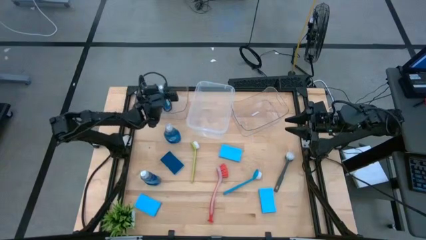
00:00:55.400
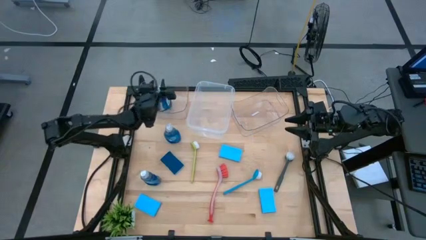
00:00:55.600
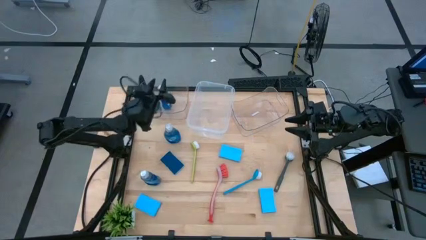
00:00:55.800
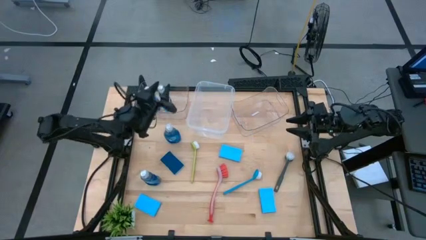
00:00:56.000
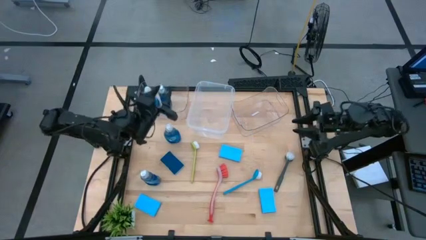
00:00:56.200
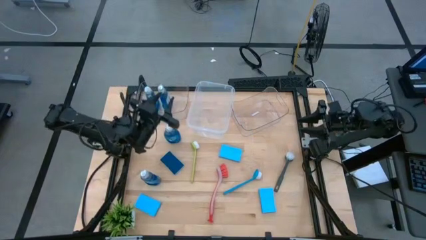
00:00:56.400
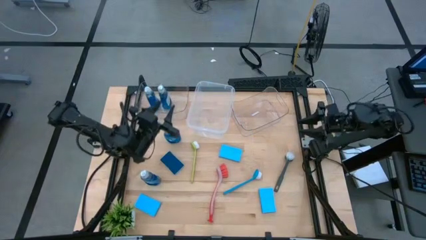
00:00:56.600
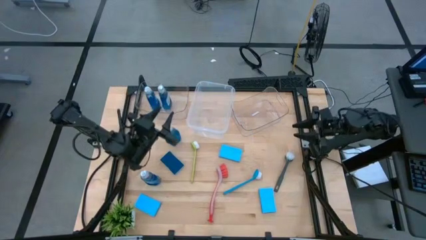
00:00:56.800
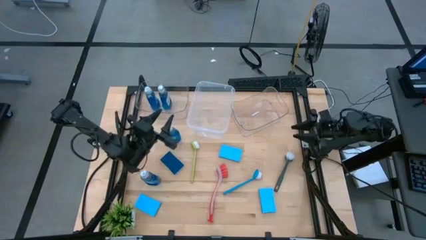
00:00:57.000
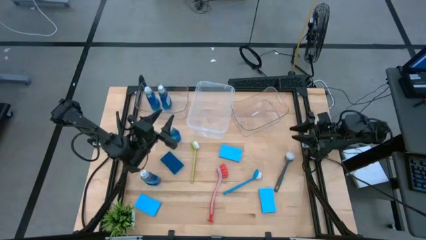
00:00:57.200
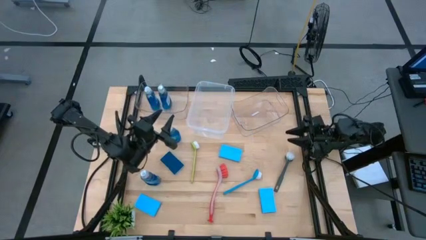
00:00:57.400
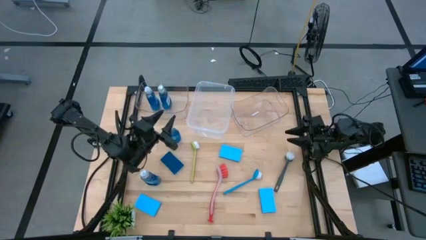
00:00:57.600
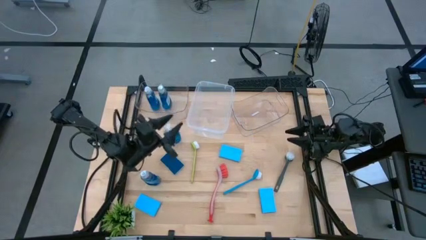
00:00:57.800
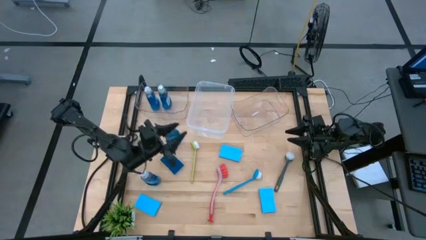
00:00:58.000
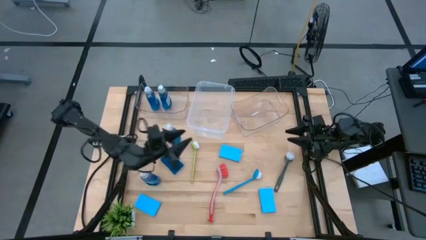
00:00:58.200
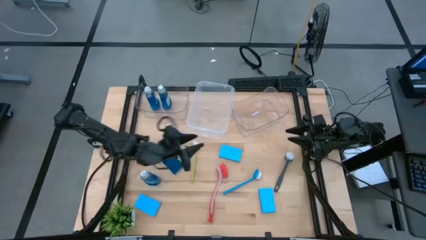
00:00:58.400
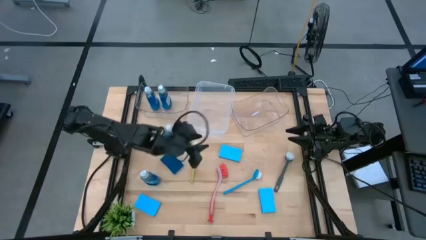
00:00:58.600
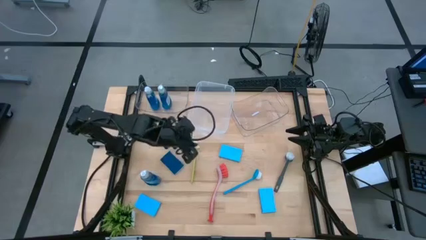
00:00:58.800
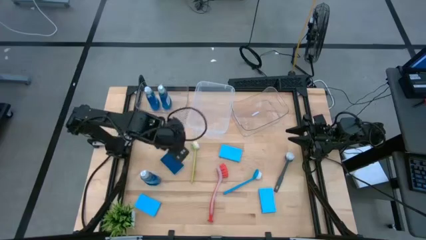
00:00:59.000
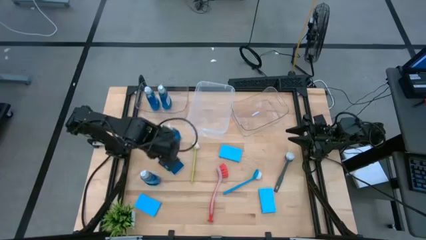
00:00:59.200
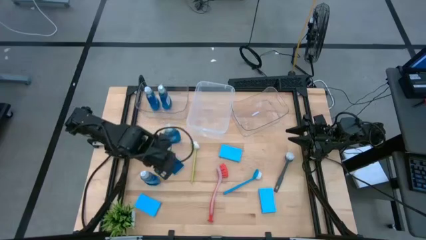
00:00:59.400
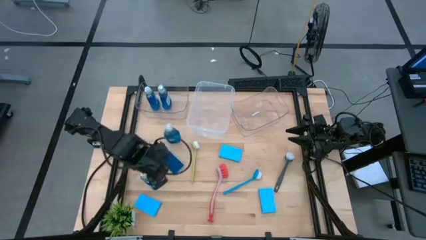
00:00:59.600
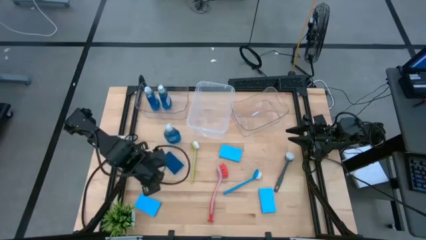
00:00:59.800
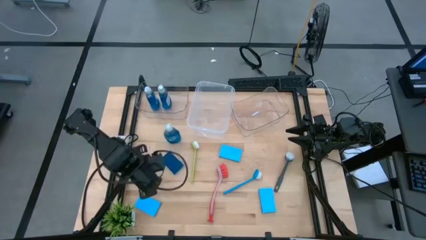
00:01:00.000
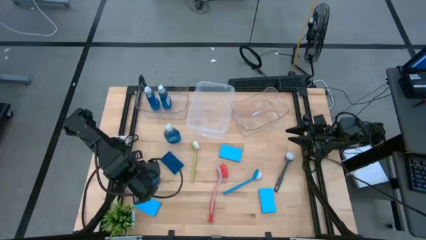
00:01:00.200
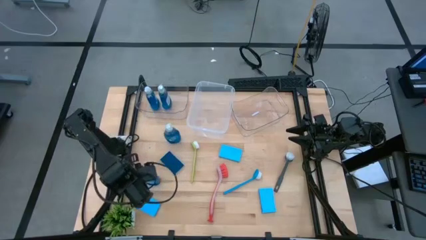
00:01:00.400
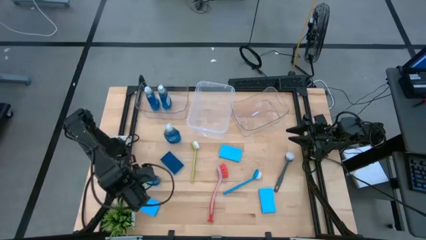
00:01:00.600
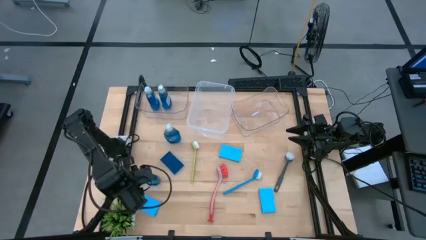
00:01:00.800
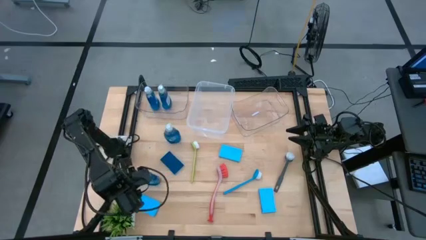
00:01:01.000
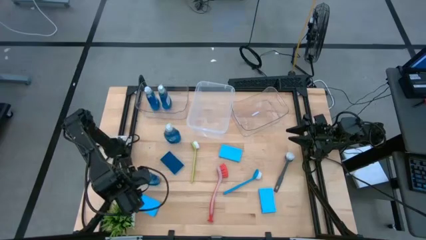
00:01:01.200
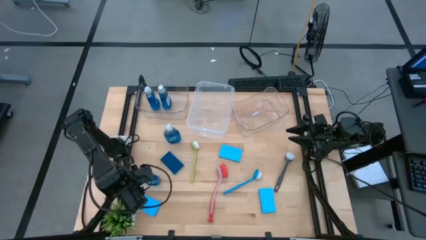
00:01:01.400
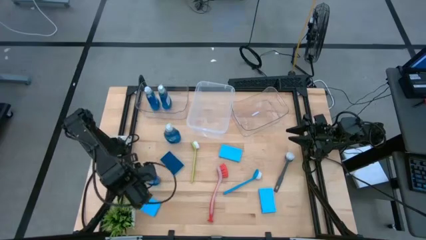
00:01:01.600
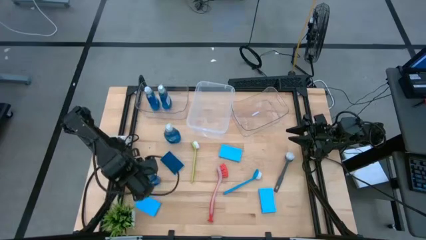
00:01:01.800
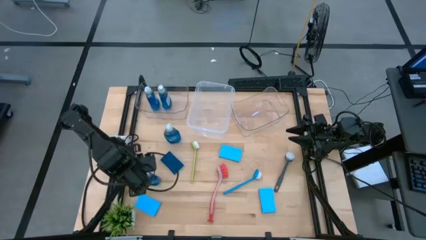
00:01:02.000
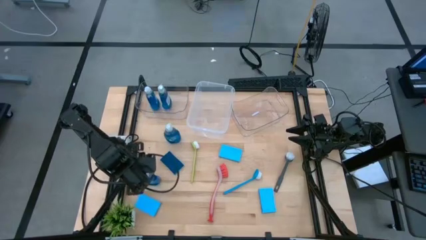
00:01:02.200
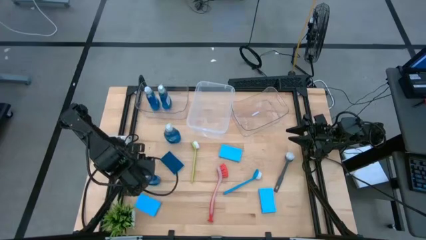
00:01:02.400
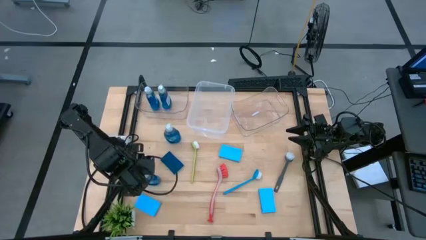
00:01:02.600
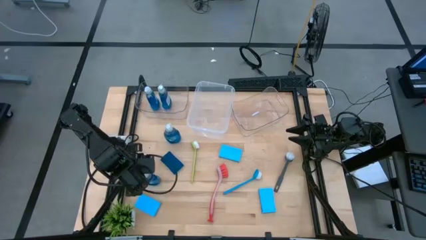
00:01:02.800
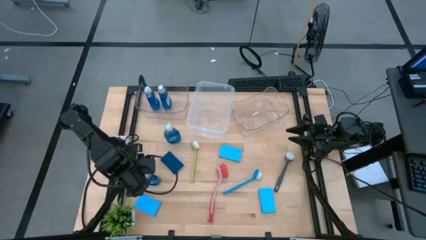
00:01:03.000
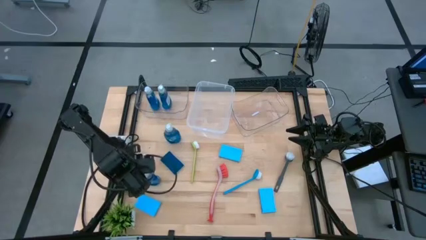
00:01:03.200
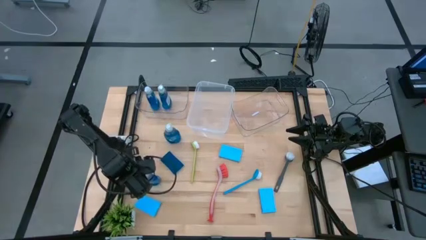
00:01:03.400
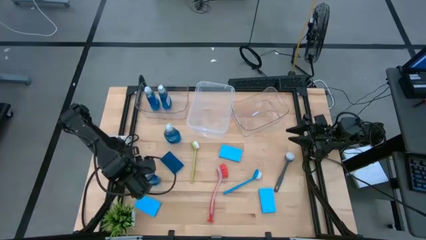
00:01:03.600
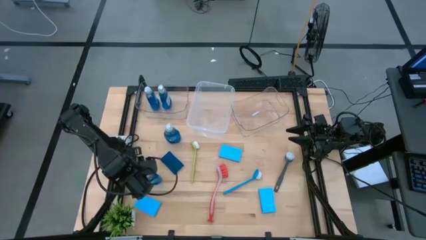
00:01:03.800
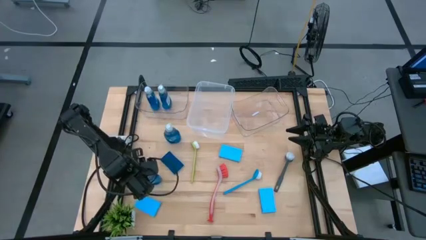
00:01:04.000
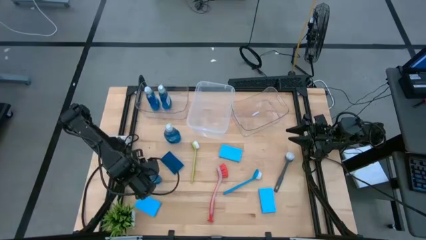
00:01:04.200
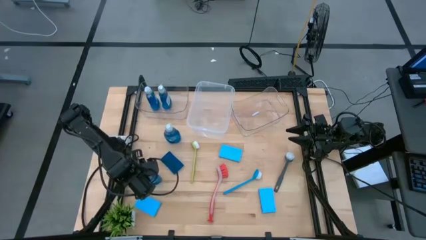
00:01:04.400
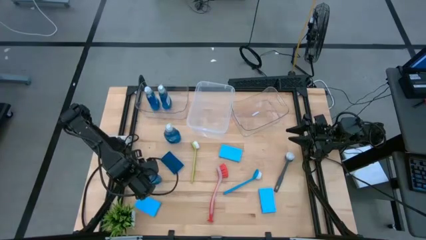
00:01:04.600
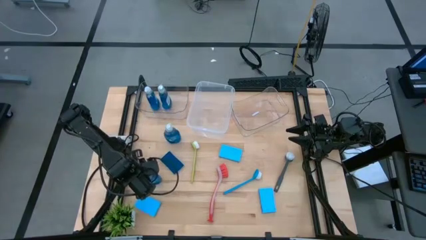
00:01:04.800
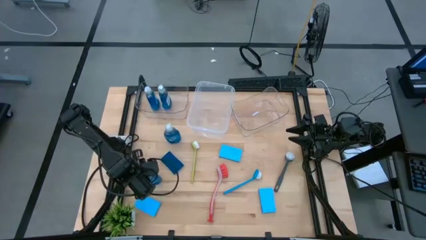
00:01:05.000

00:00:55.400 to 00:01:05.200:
Task: Pick & Place Kitchen Sink Supplies
Put the dish soap into the left transparent bin

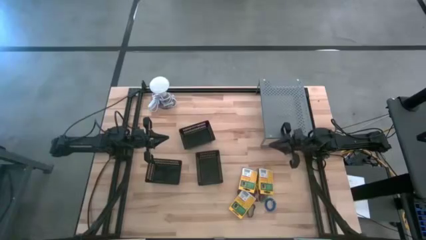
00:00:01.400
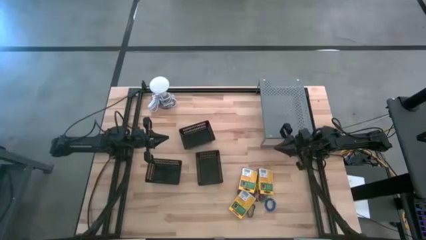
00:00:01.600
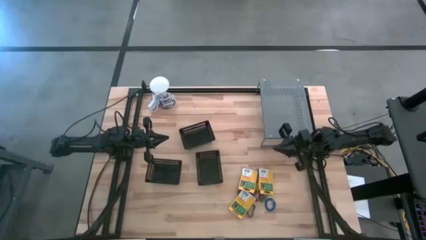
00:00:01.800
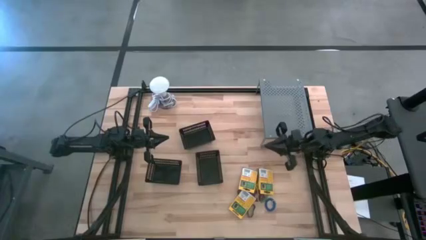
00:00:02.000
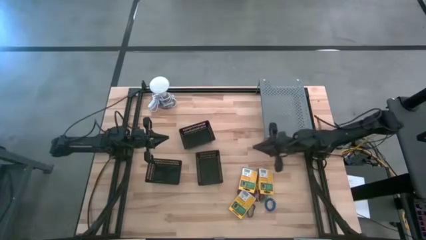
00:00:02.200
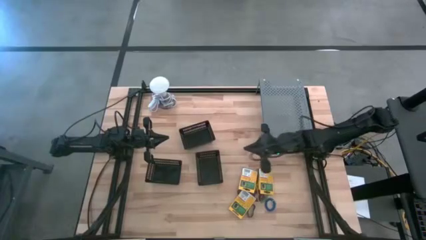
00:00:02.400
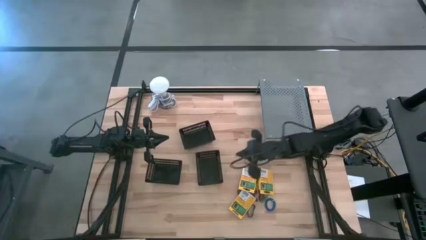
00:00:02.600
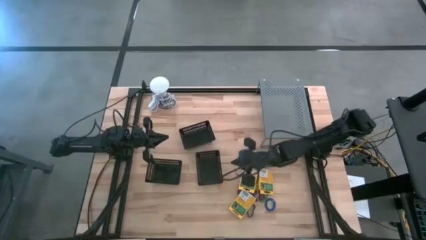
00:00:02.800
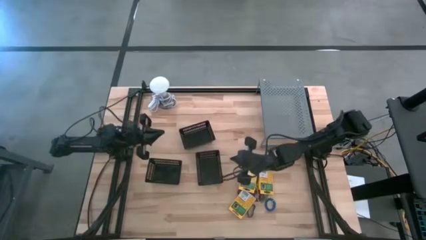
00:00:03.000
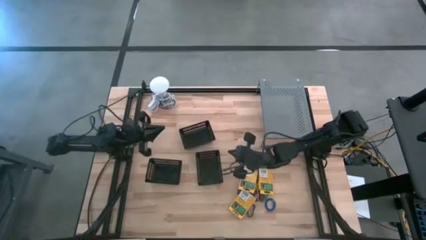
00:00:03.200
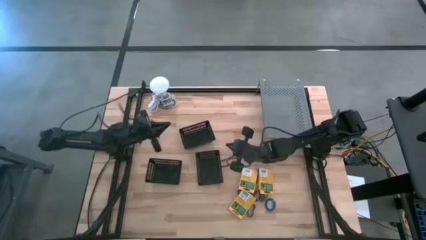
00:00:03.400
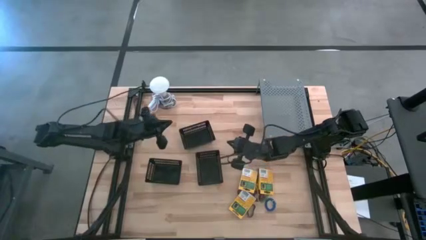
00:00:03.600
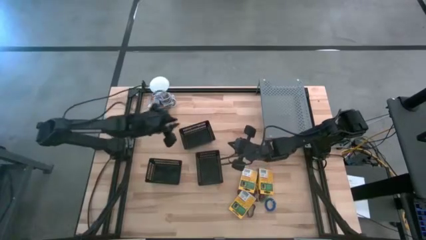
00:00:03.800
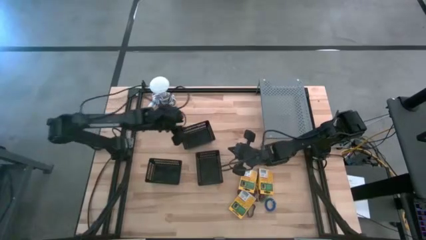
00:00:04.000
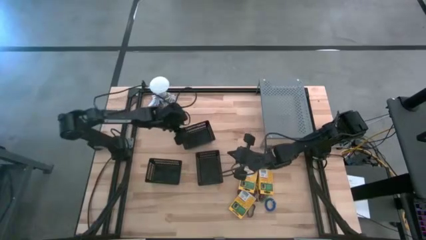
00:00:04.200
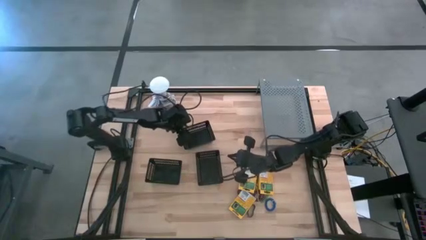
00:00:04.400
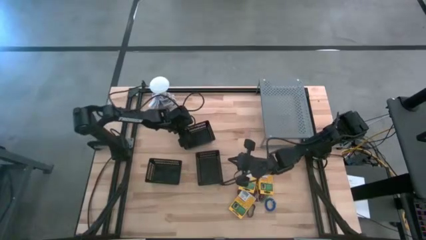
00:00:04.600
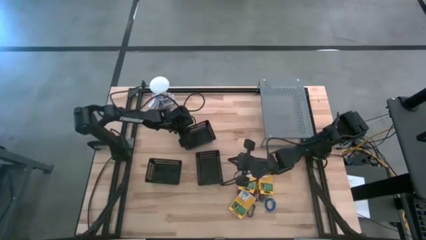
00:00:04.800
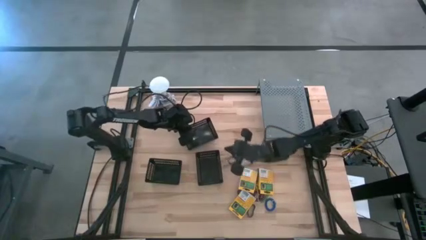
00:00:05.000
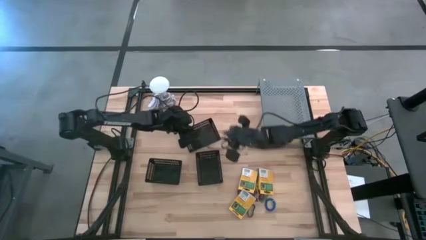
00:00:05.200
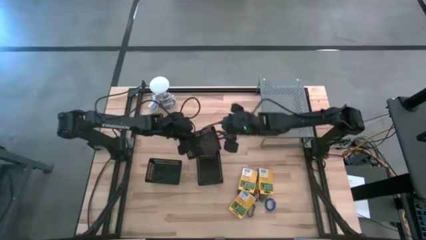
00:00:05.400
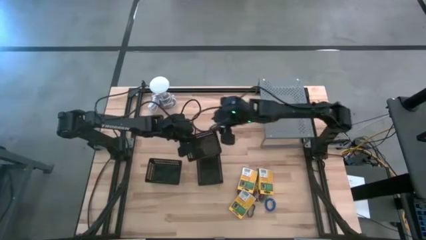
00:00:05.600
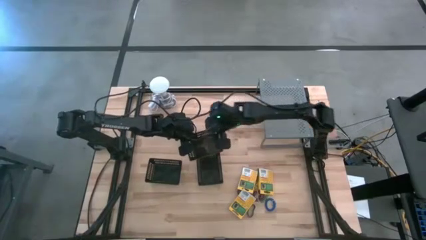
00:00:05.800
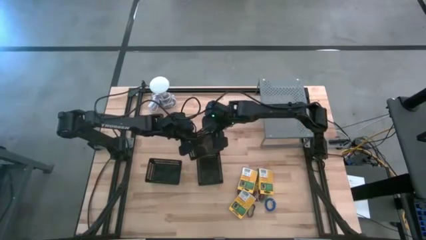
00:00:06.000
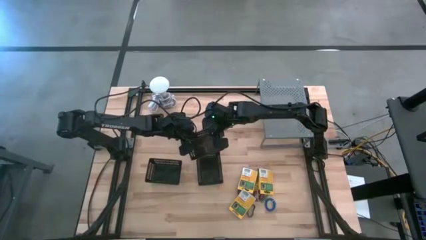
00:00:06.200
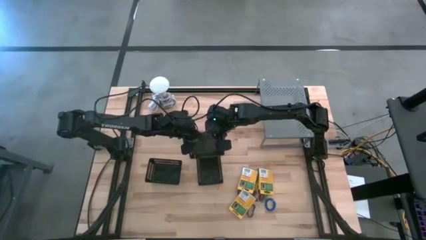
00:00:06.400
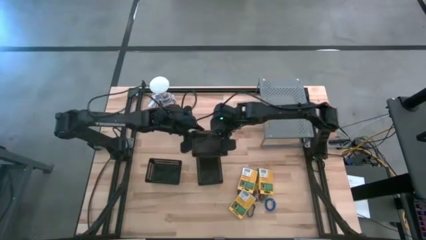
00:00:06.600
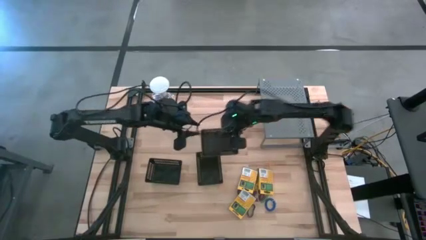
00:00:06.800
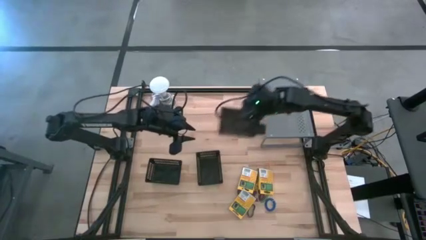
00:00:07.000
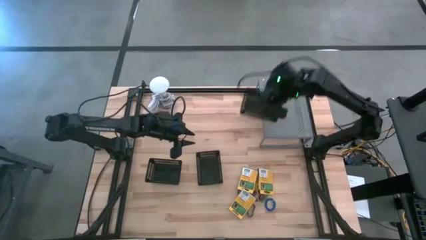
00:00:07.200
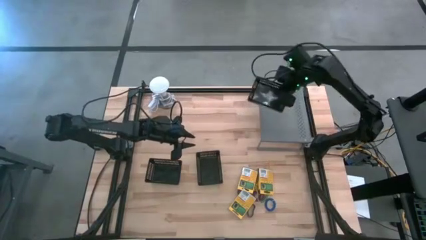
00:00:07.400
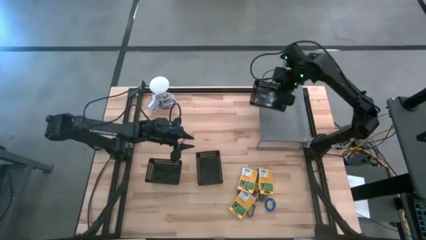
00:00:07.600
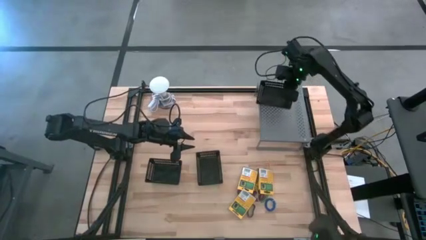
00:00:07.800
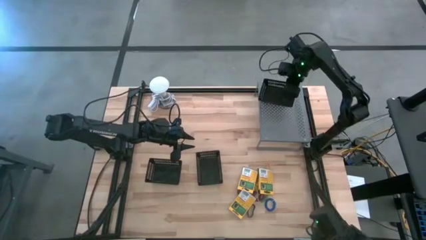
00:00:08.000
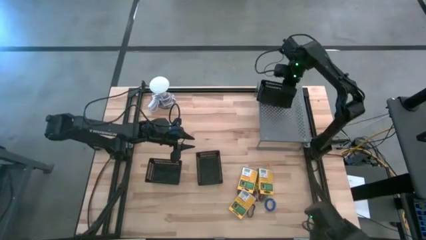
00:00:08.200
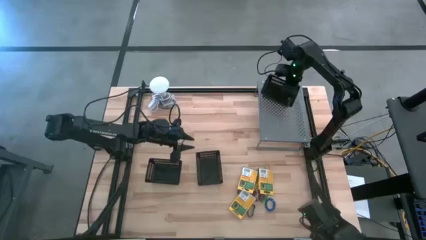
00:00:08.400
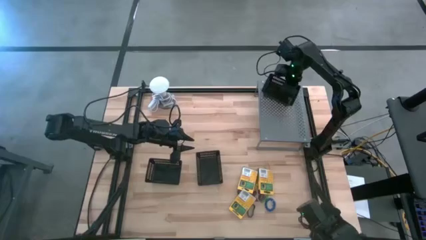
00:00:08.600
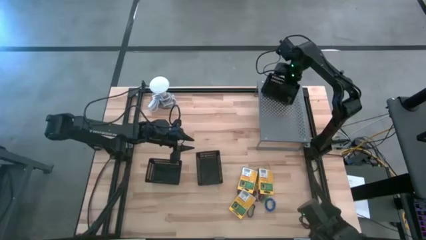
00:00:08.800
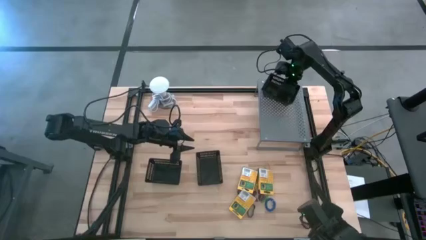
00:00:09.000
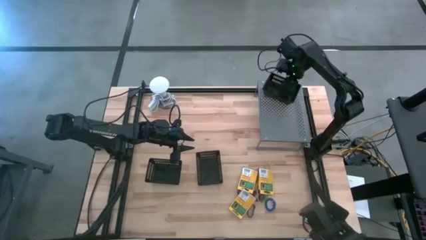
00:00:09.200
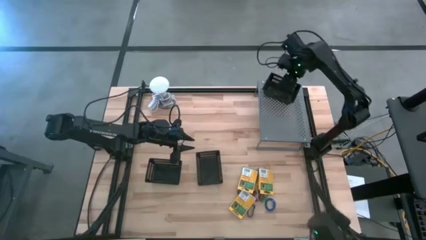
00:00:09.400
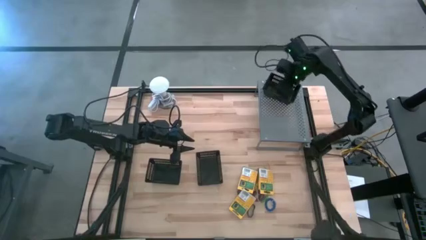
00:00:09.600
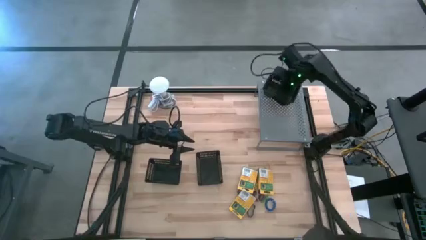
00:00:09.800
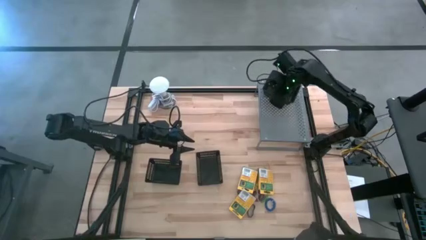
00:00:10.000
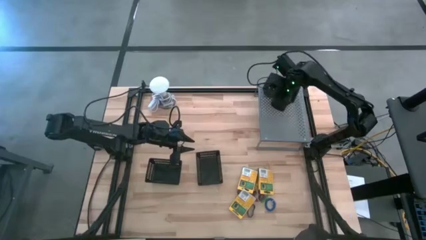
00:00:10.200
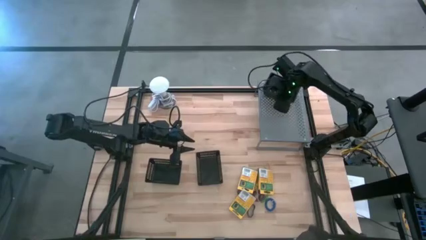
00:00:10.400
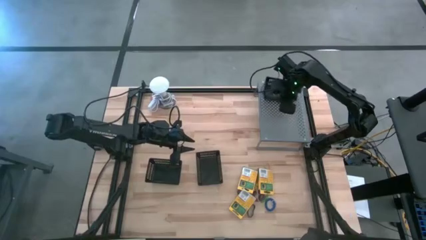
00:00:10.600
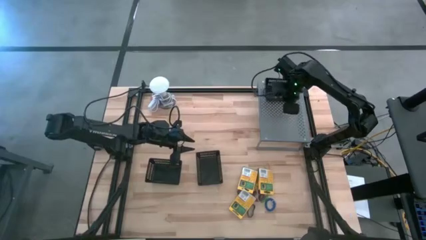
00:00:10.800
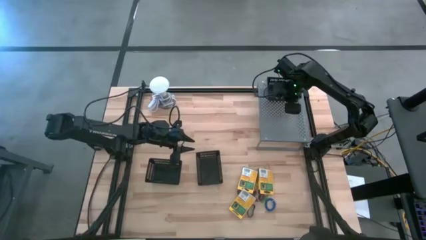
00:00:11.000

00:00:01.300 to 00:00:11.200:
Task: Pick & Place Office Desk Supplies
Put the black bin on the shelf
